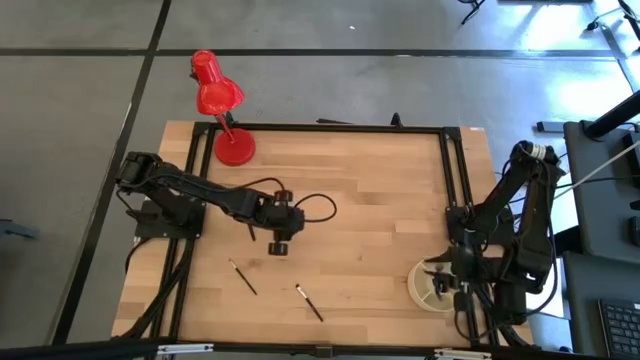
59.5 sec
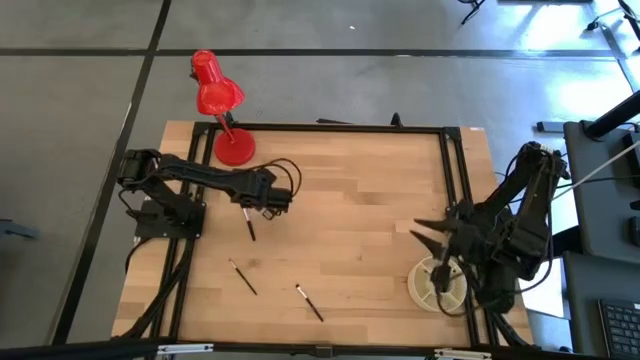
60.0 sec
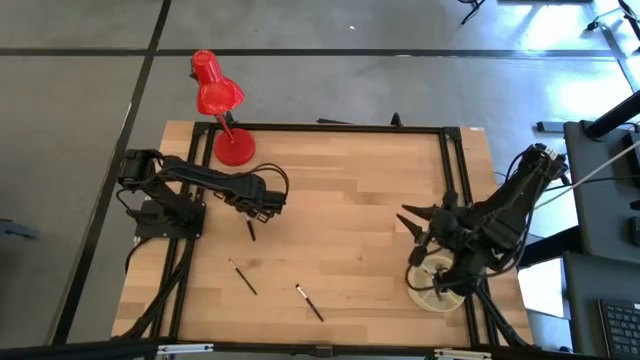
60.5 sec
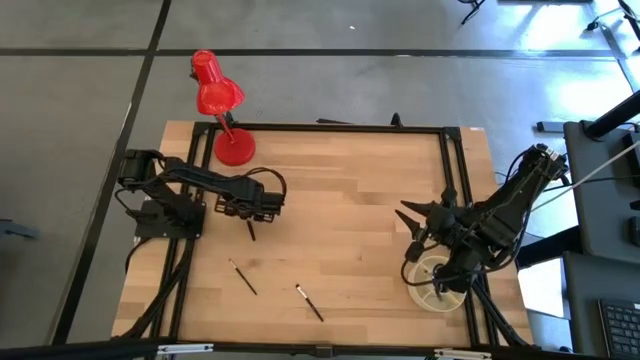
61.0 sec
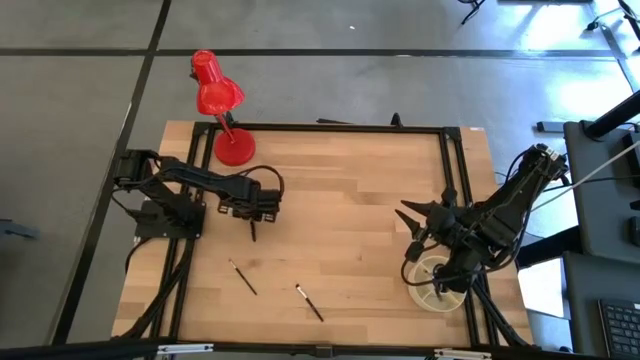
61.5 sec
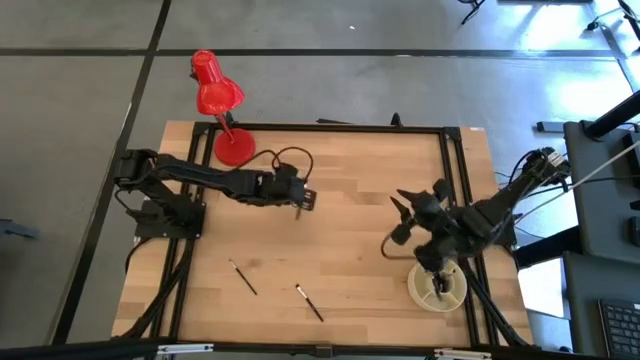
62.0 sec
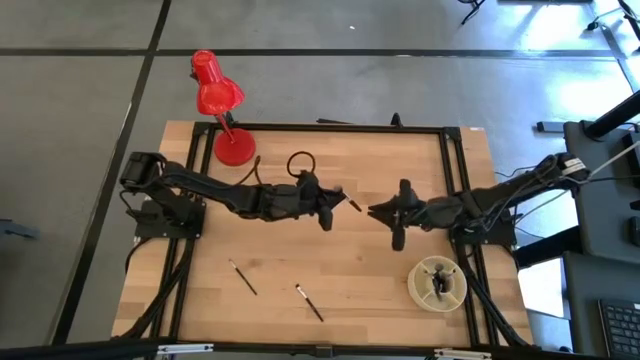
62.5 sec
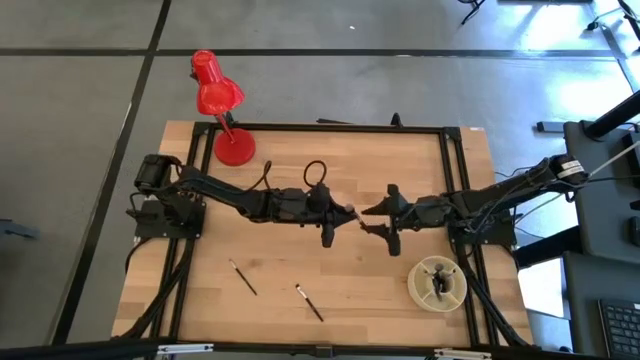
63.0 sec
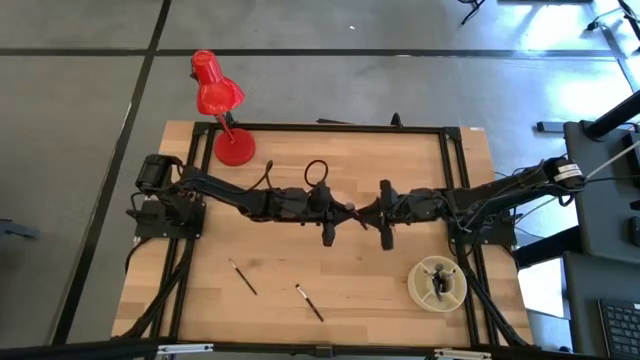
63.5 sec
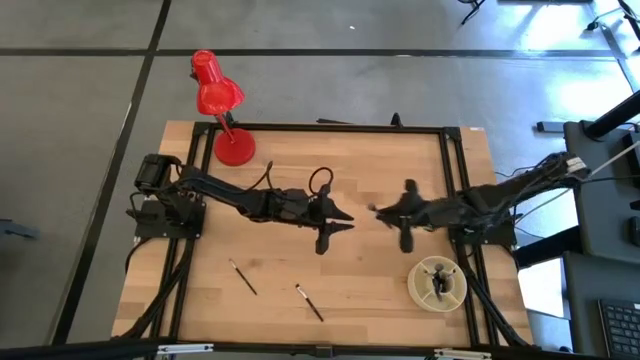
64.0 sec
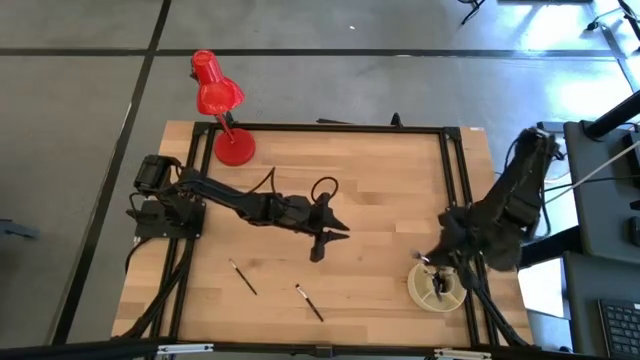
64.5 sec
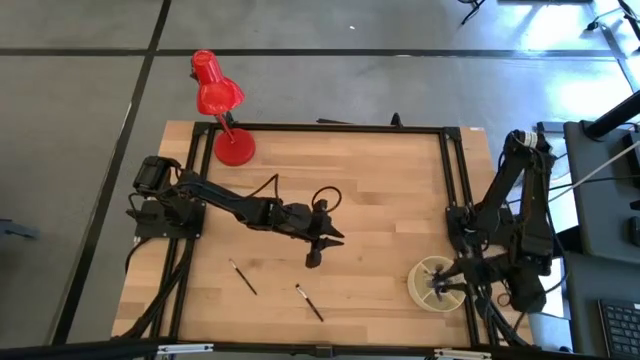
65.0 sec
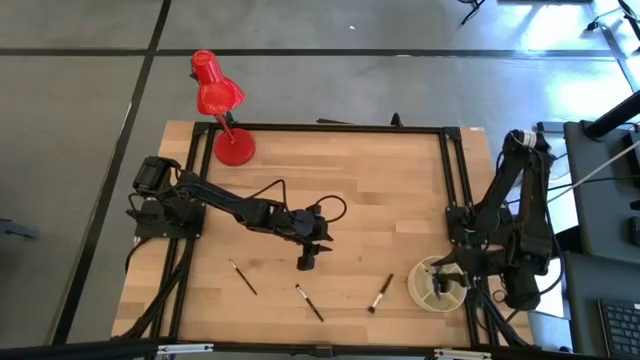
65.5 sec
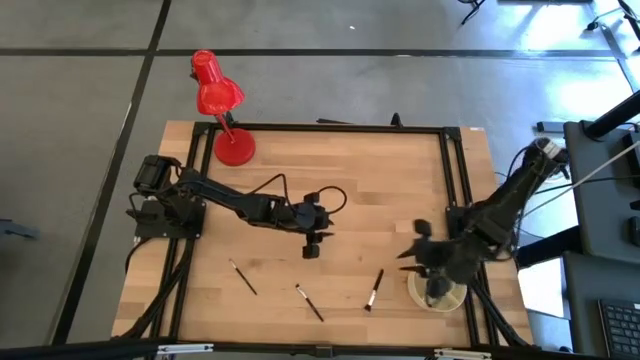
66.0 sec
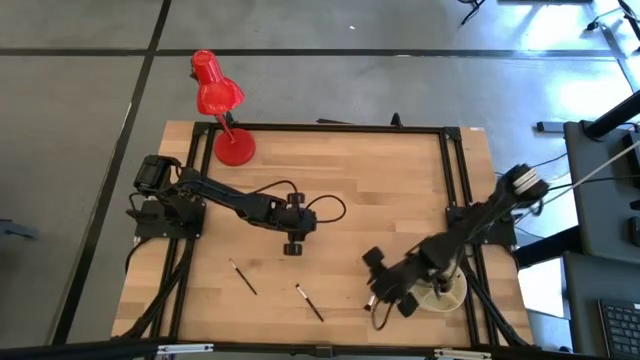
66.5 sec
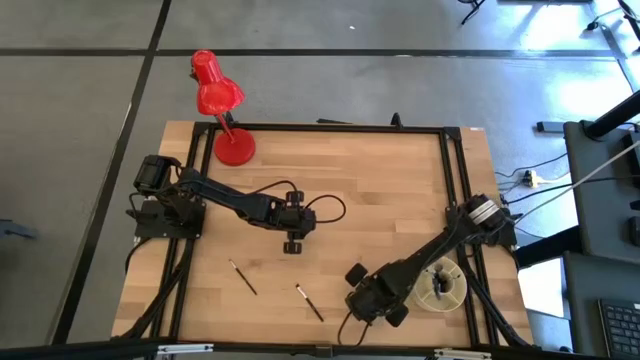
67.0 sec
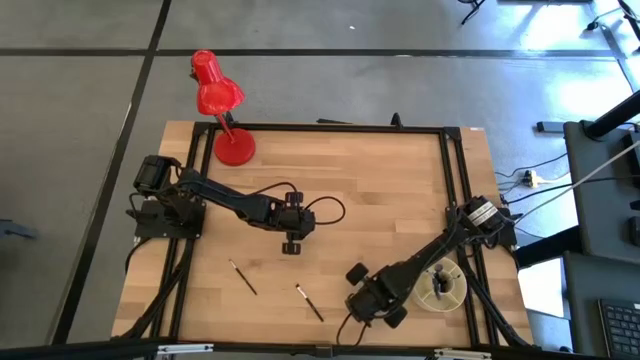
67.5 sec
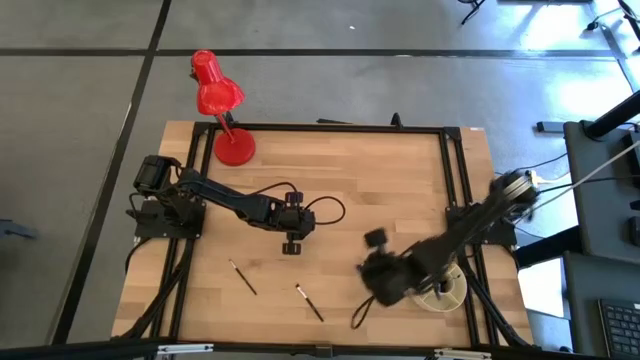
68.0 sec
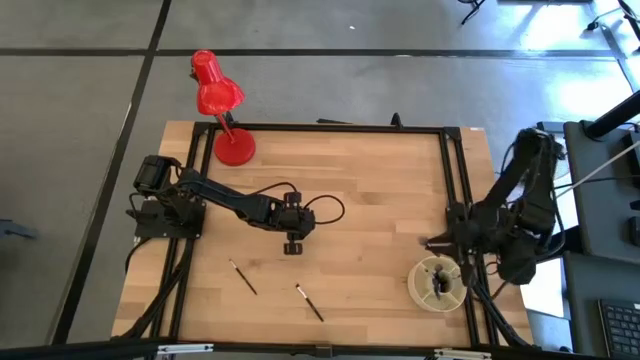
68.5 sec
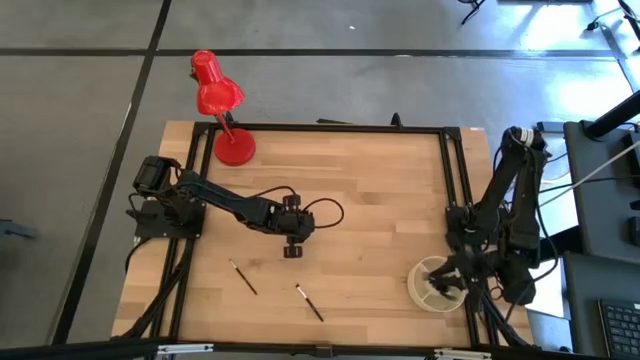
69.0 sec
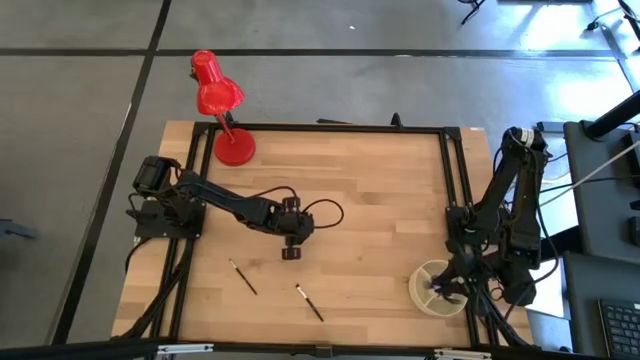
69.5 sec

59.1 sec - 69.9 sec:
Task: Pick & Place Makeup Supplies
Put the makeup brush into the organizer

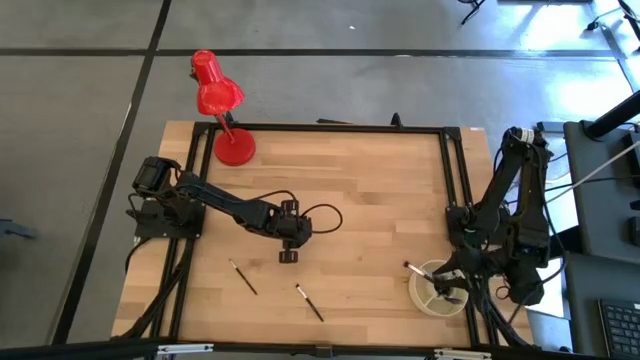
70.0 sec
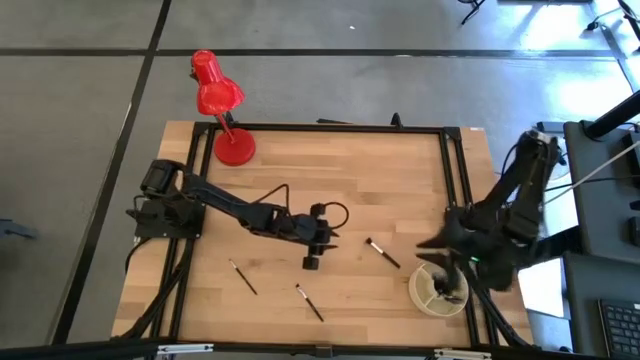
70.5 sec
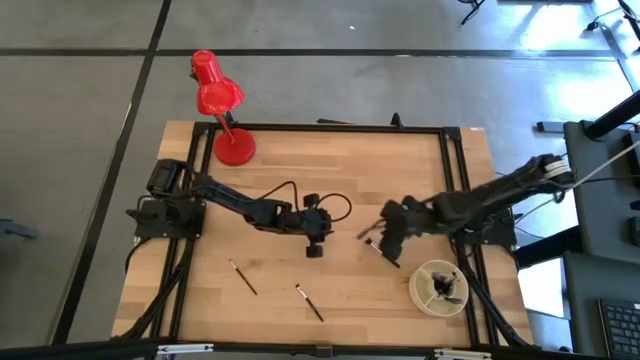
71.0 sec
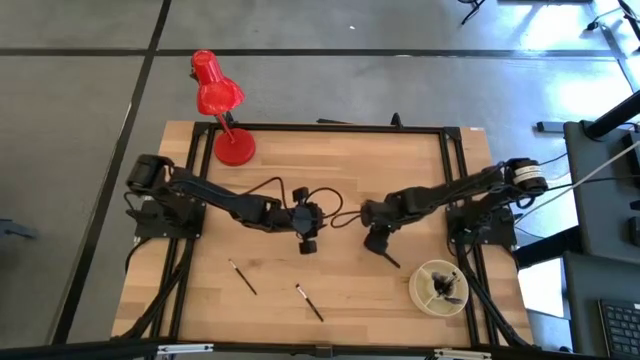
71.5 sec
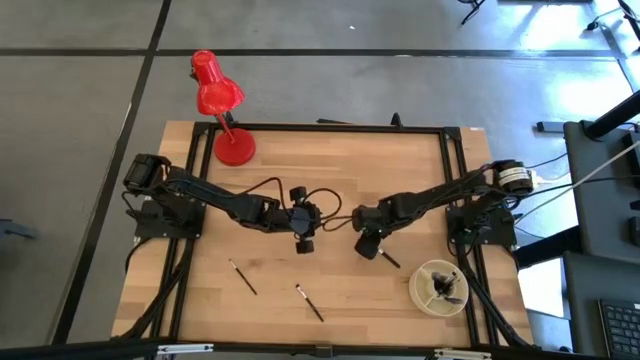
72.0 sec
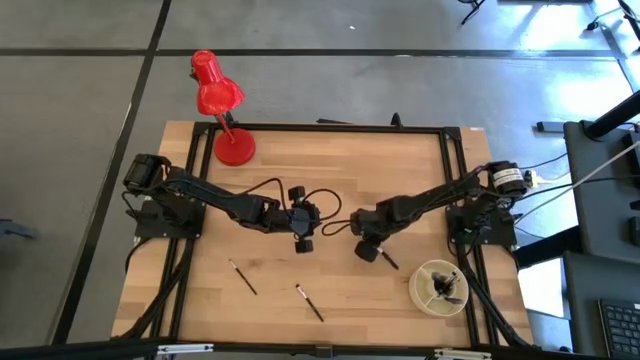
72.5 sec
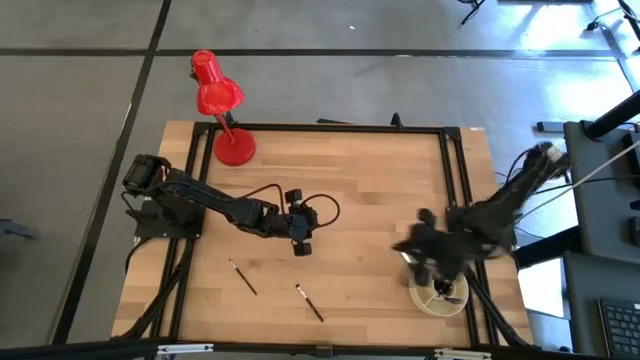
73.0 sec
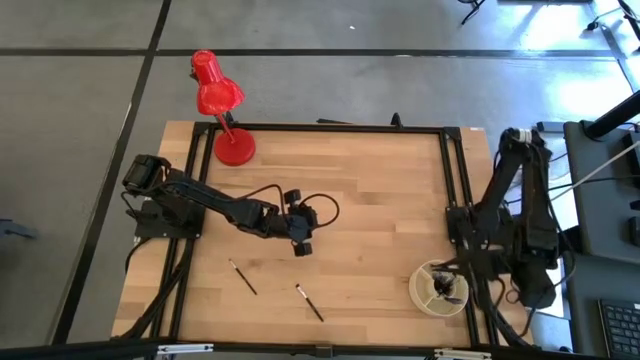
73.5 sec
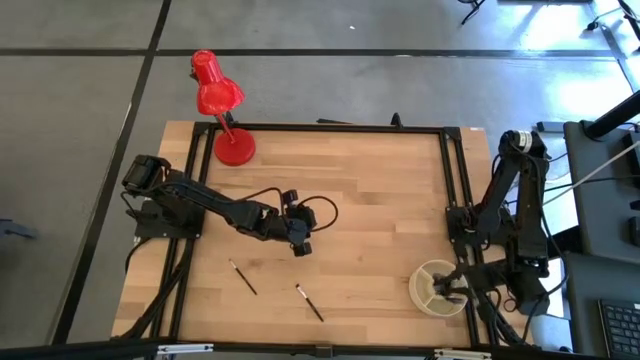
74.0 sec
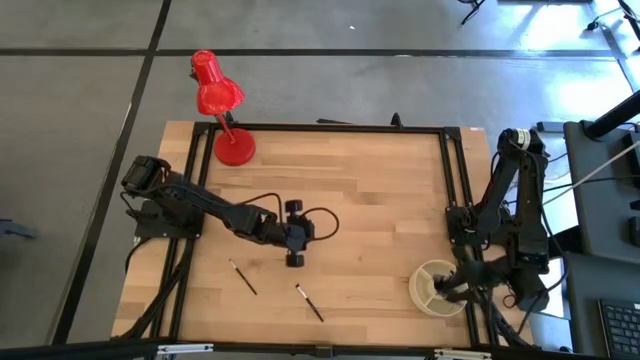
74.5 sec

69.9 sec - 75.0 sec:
Put the makeup brush into the organizer

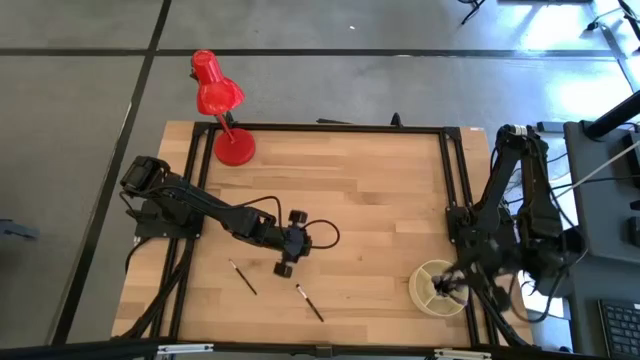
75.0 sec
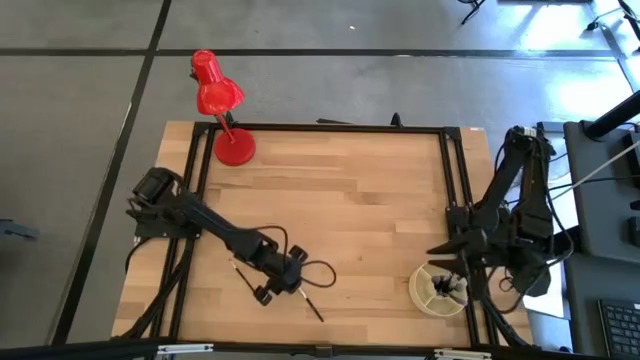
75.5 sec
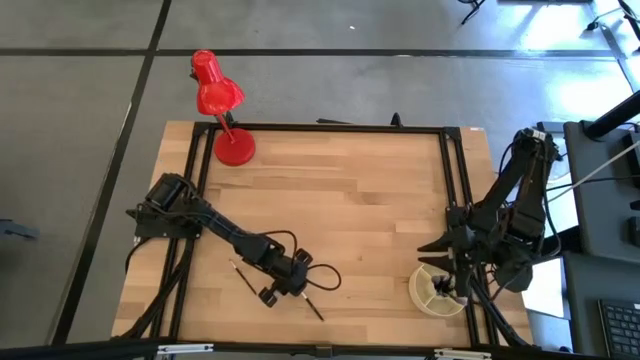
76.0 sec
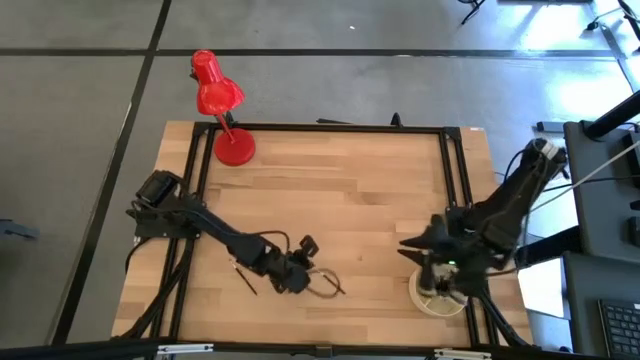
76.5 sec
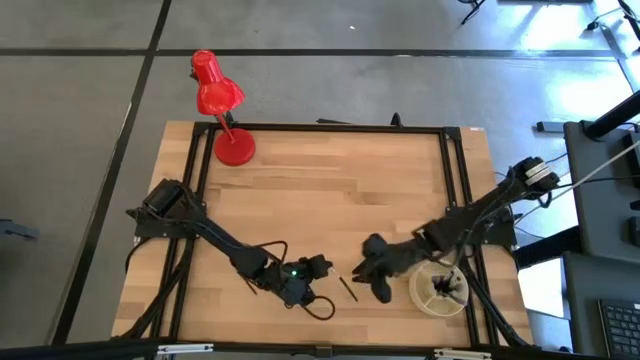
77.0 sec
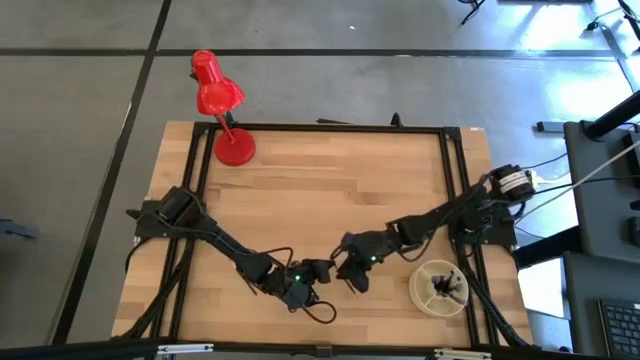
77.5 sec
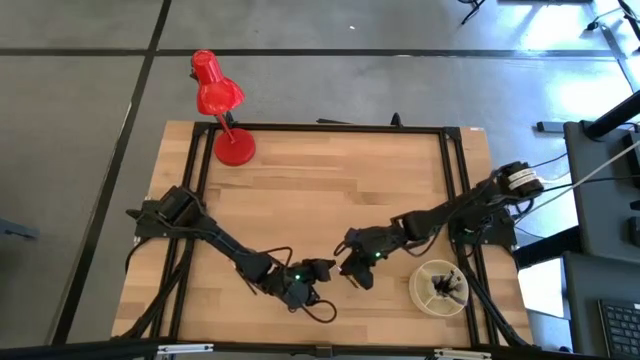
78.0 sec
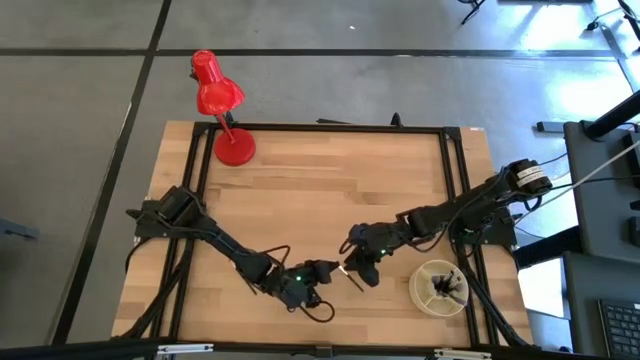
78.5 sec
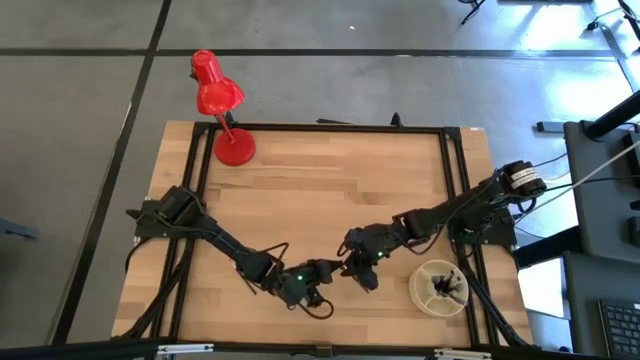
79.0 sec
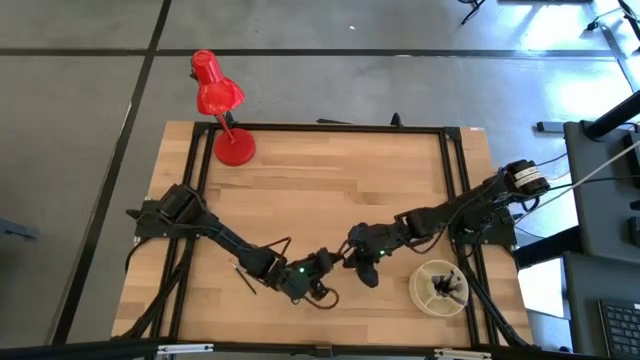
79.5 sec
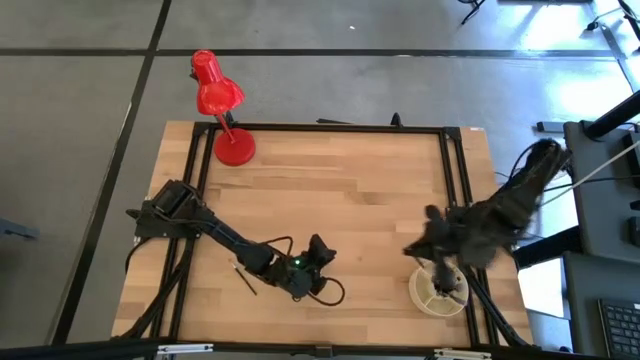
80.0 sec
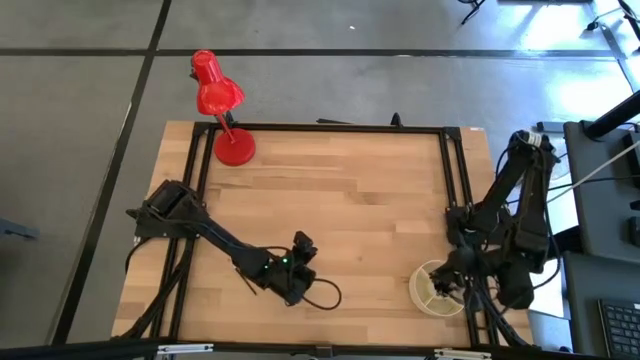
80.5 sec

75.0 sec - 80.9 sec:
Put the makeup brush into the organizer
